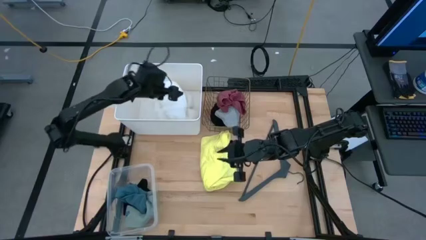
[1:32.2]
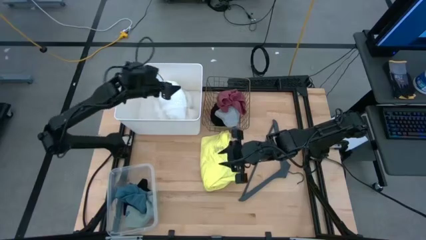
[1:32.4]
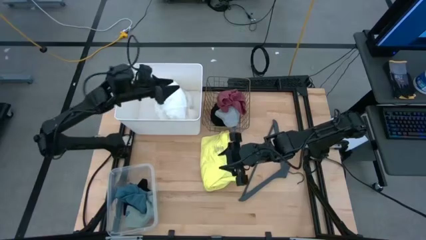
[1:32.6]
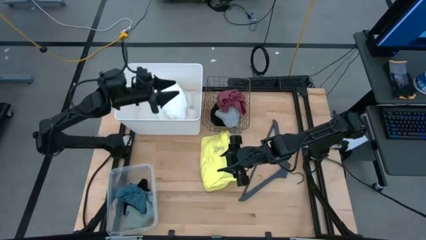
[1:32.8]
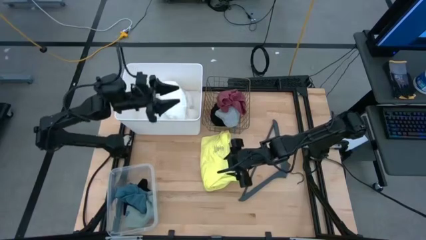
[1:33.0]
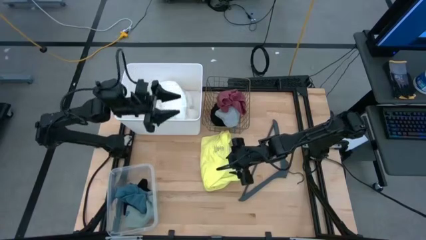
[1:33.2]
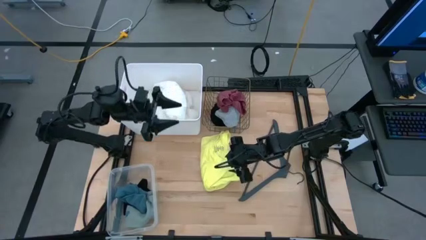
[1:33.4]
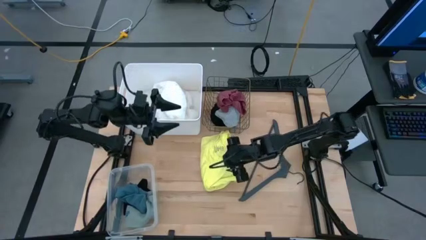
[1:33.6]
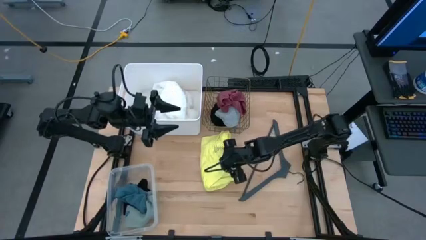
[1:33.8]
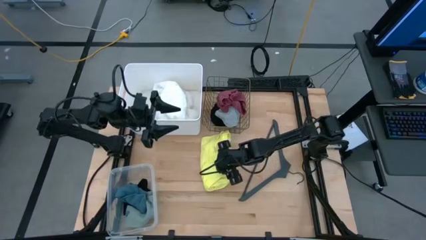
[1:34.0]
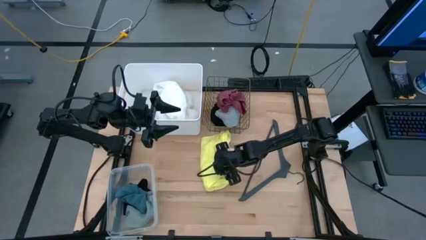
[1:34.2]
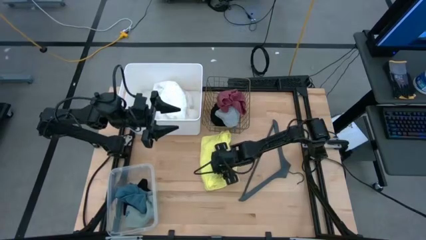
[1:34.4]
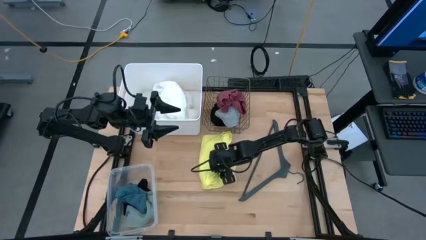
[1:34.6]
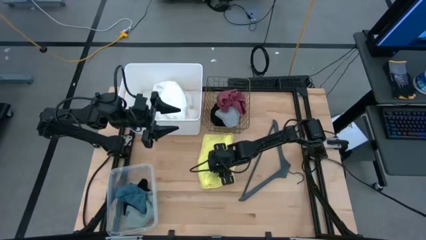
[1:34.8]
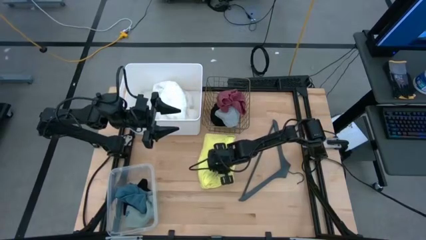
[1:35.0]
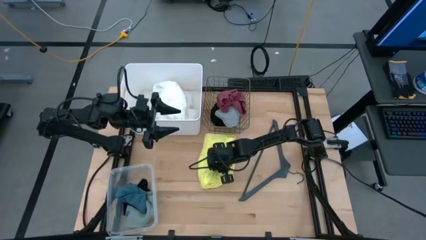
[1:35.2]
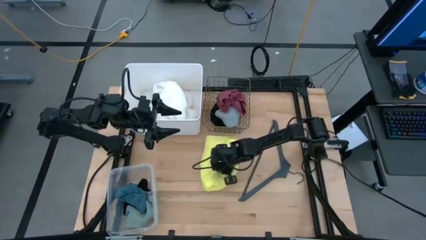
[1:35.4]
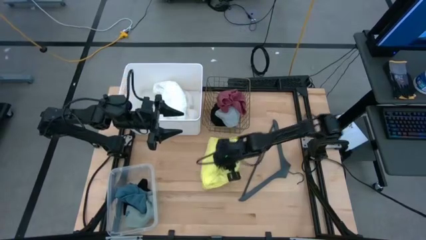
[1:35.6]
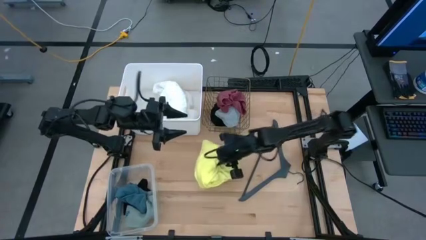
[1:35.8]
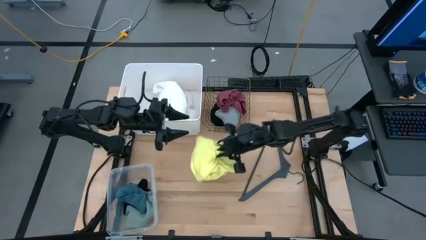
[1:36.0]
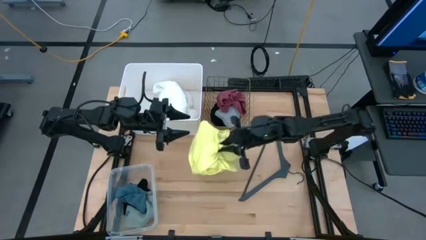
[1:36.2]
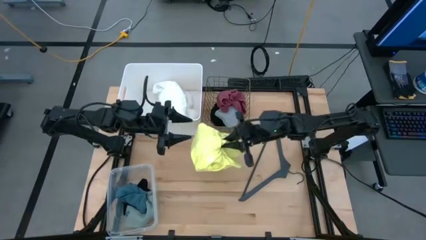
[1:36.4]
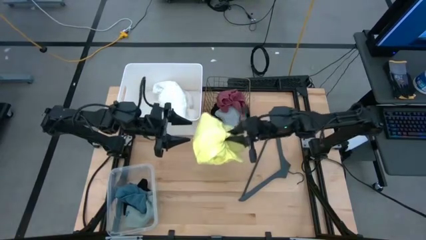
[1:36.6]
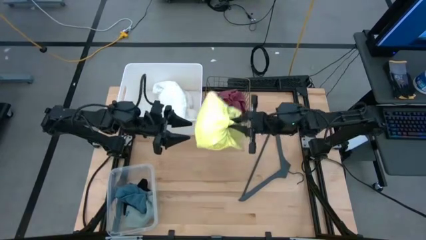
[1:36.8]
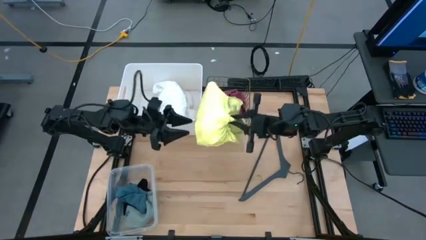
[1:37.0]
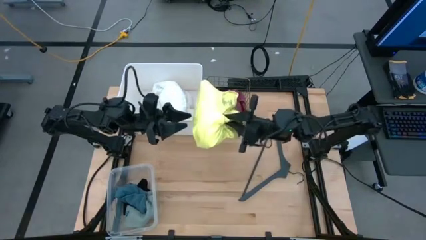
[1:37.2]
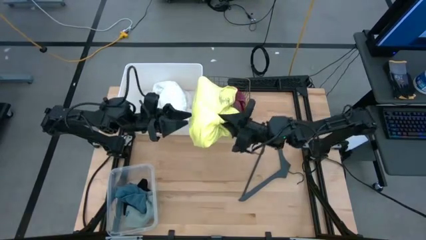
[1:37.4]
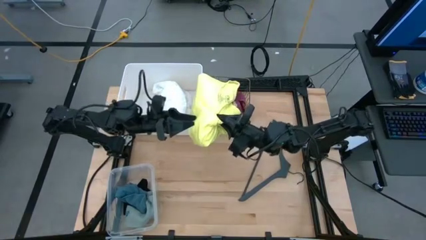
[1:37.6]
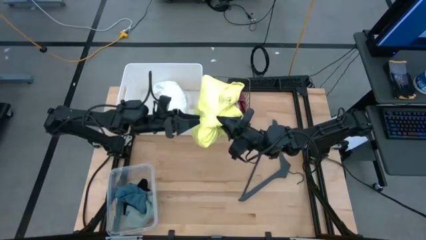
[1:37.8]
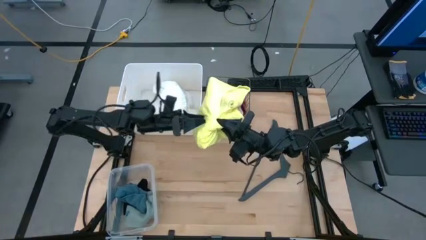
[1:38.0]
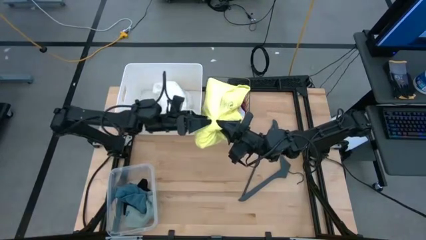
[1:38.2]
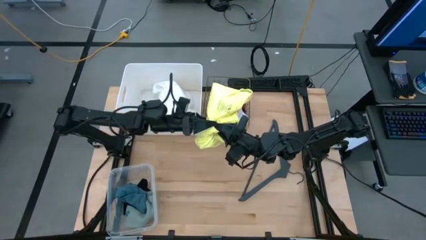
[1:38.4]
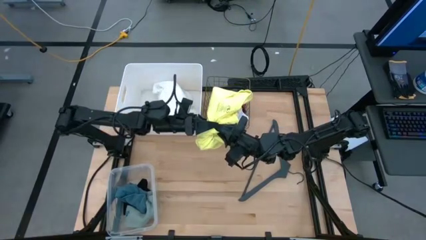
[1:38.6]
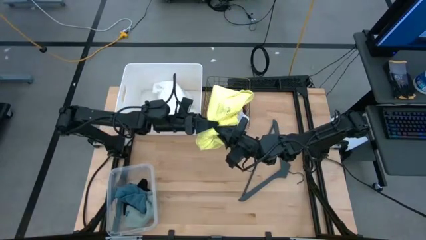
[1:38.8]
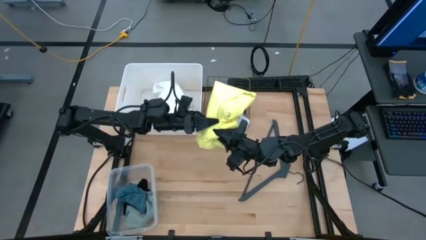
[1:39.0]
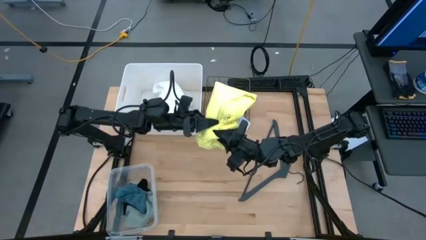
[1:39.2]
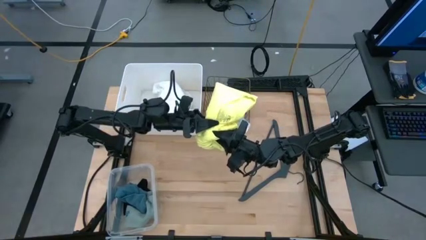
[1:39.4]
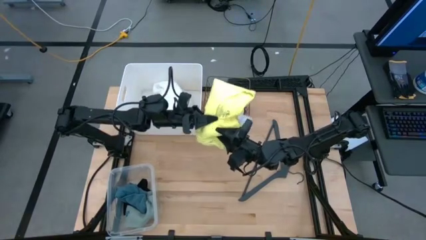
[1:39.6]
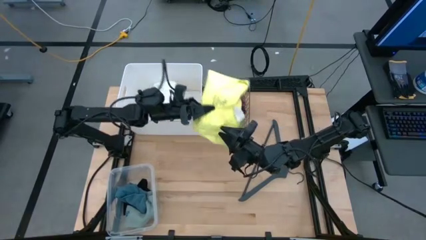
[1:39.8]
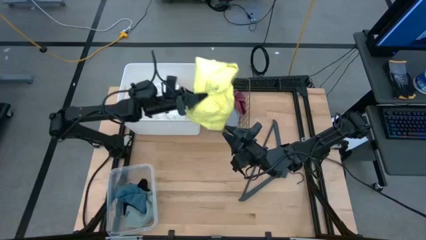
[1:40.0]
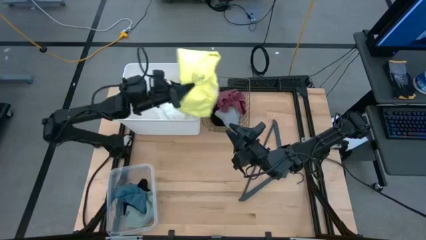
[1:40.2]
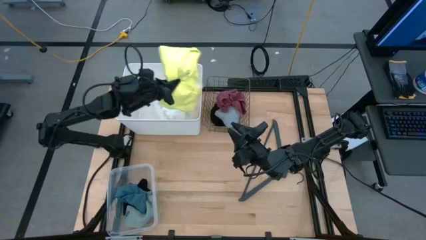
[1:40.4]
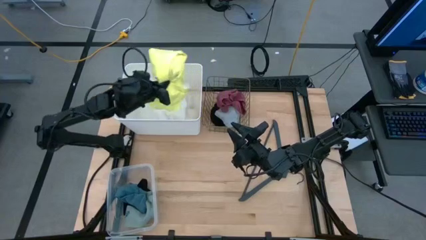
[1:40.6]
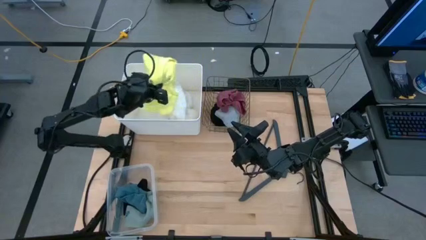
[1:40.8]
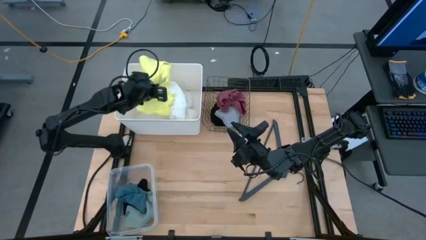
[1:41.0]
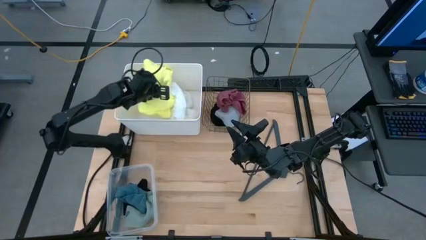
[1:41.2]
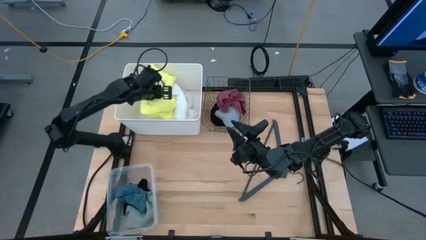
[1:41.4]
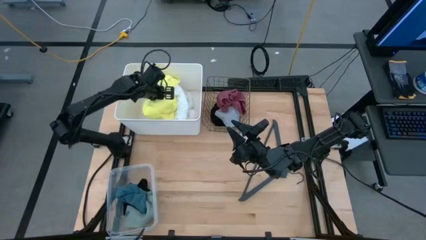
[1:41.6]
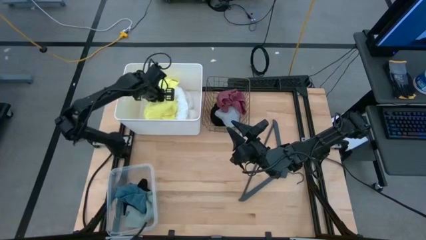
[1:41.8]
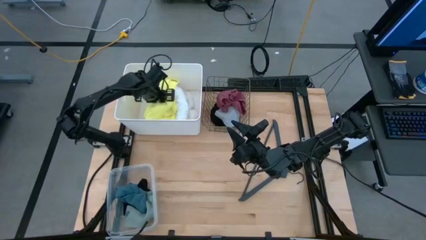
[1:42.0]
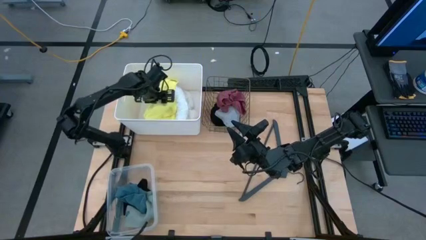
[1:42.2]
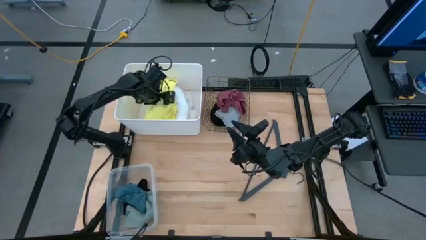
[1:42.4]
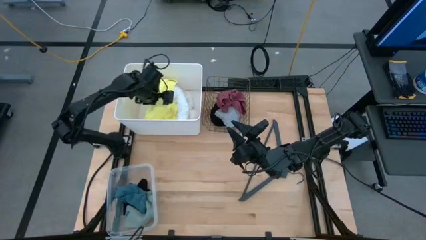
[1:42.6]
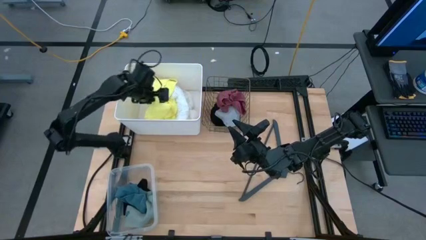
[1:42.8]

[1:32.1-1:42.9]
Task: Pick & Place Cloths
Put the yellow shirt into the white bin

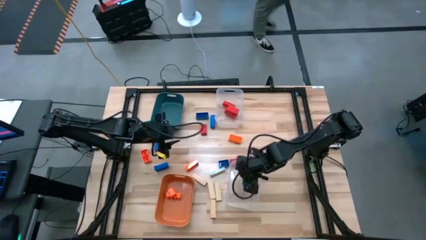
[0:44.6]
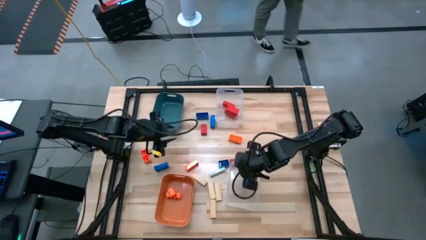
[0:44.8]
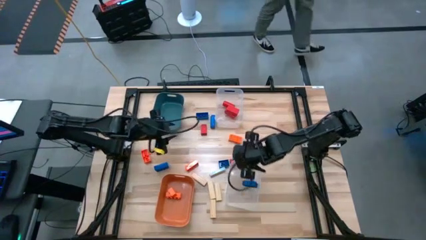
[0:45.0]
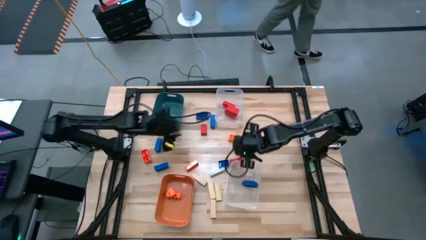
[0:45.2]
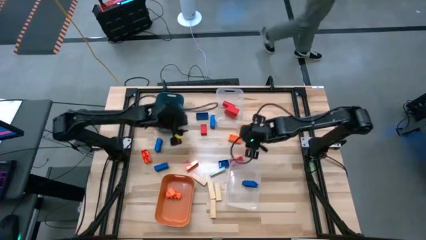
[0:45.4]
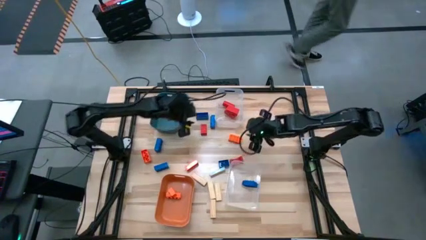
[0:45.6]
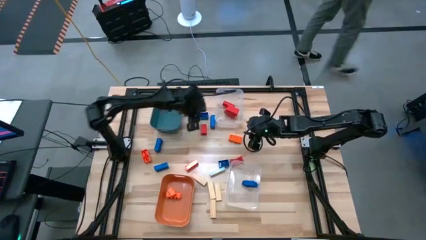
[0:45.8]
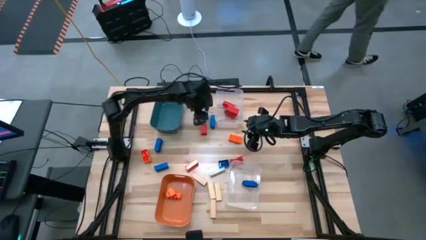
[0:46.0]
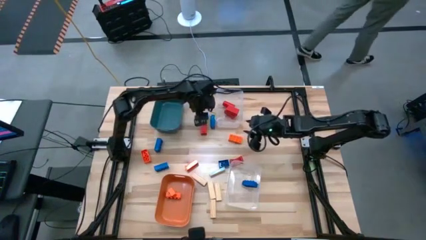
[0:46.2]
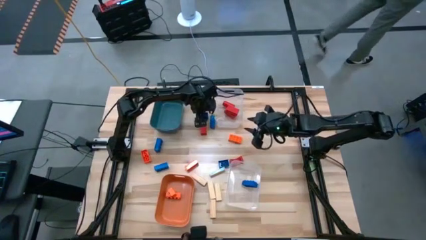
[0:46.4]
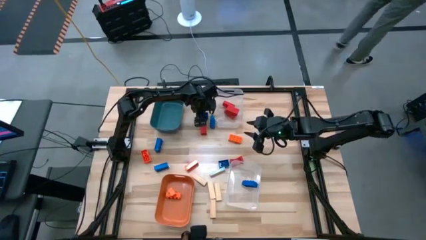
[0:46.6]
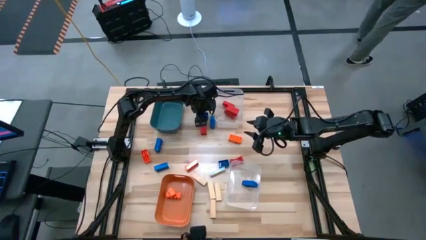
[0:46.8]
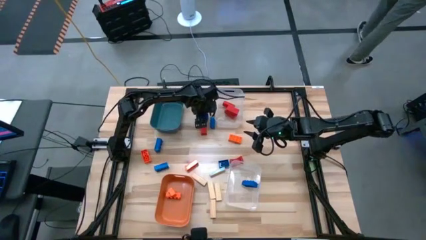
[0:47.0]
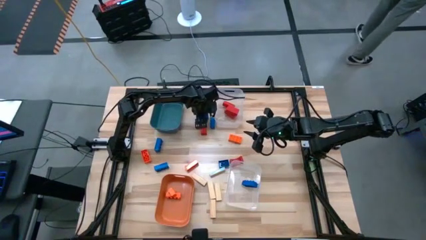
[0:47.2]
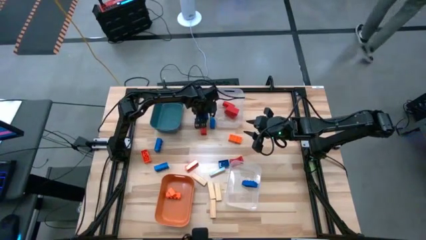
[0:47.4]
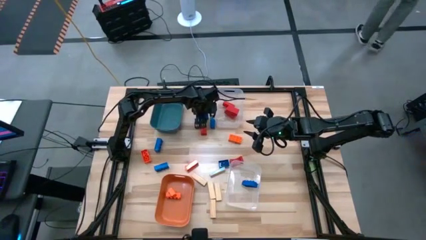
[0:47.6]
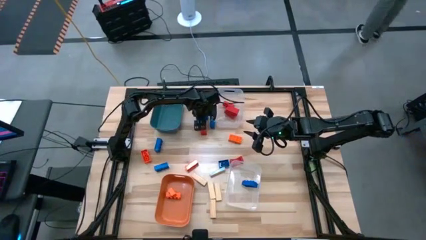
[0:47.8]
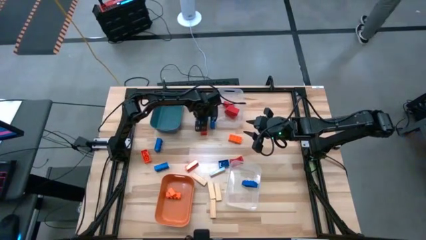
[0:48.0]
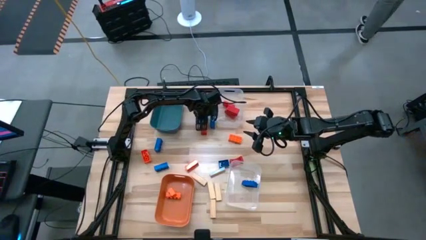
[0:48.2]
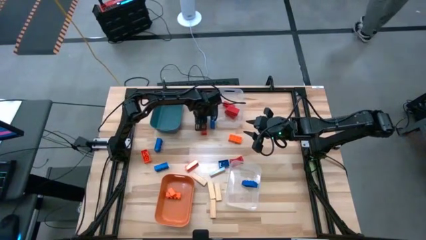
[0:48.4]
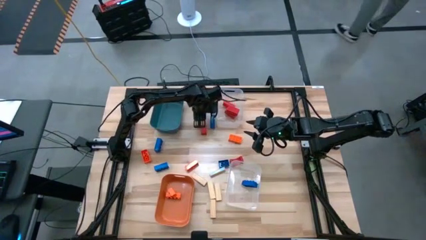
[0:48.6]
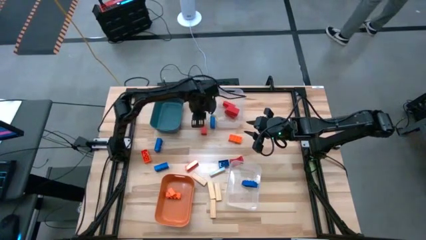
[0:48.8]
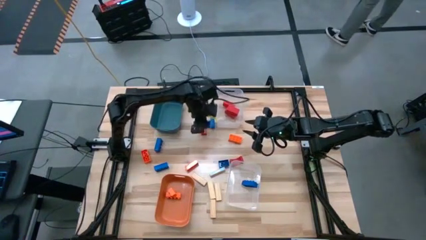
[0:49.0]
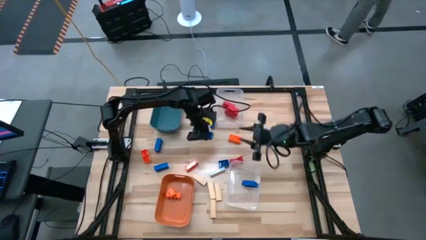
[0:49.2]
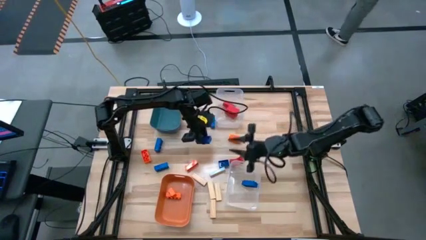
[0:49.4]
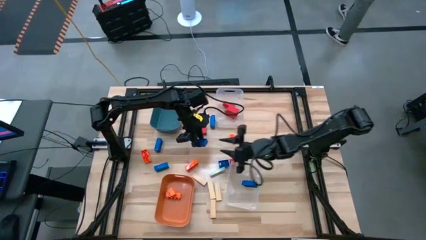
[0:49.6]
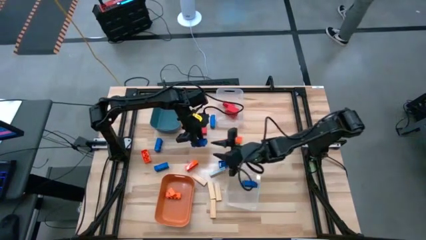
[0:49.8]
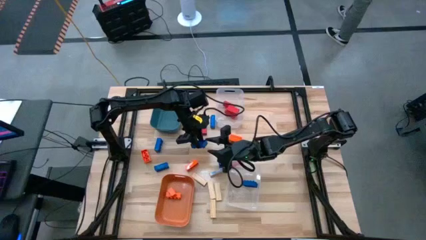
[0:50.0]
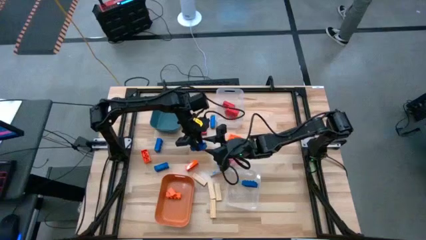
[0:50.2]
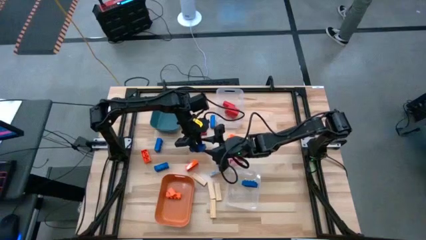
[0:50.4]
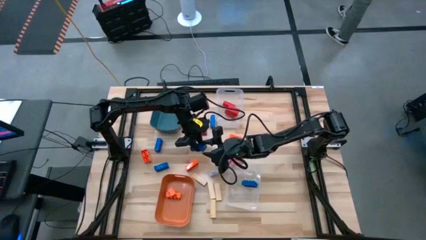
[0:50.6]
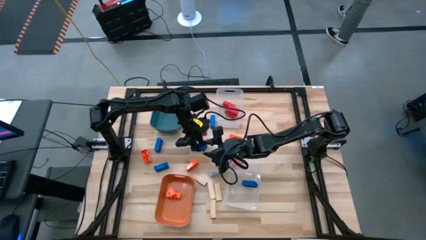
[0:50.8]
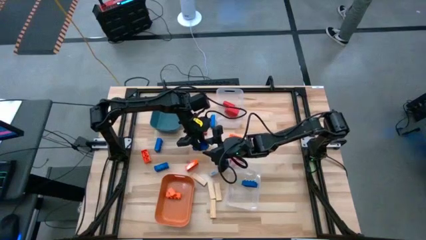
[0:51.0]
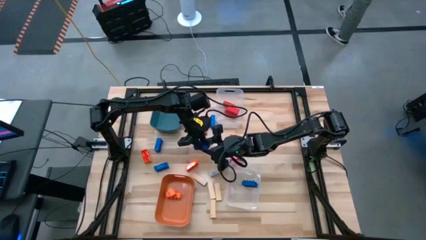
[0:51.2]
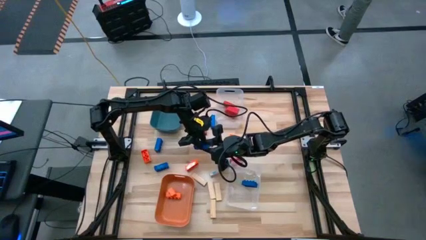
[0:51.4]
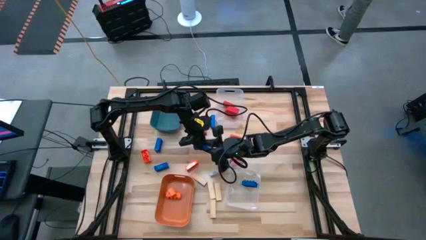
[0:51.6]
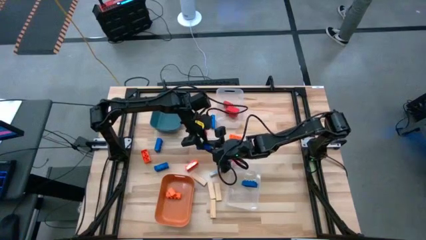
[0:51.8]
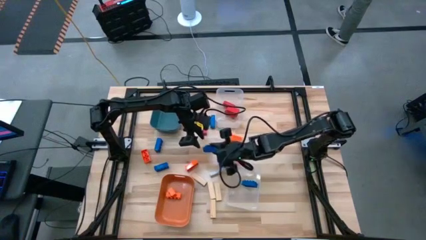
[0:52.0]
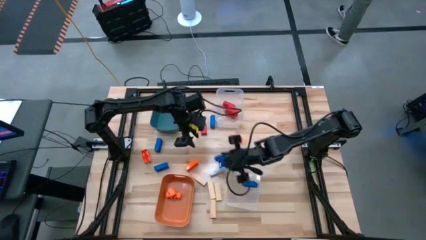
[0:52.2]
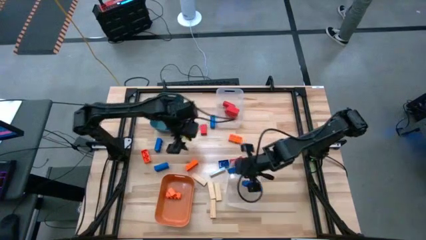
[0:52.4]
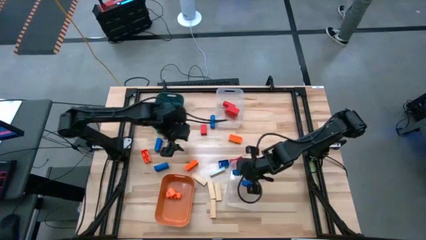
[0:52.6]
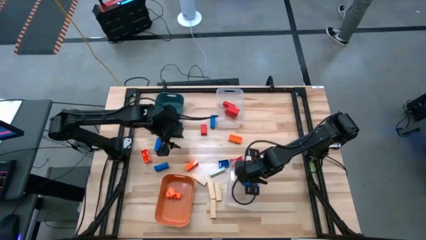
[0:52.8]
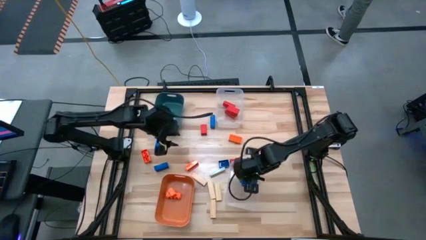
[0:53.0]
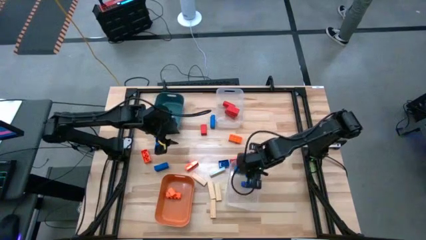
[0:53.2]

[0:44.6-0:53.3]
Task: Sort blocks
Put the blue game piece into the bottom transparent bin
